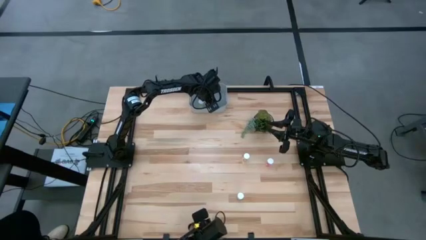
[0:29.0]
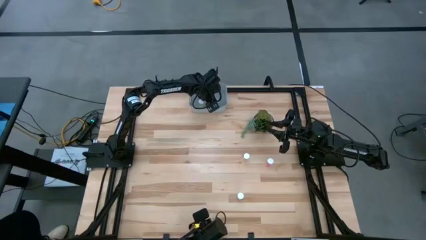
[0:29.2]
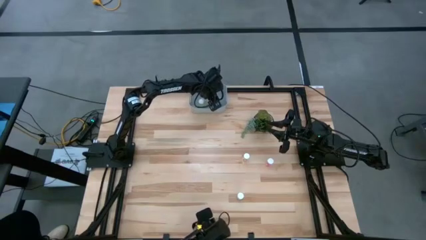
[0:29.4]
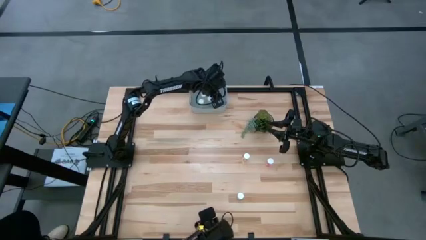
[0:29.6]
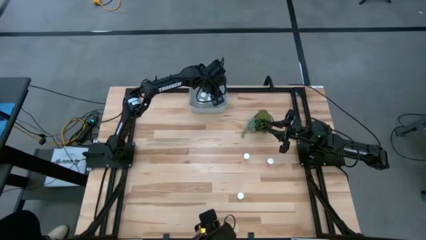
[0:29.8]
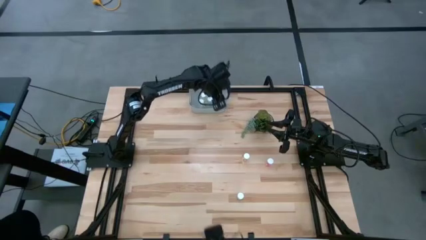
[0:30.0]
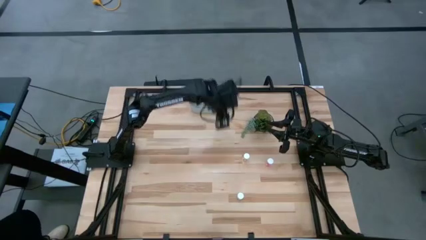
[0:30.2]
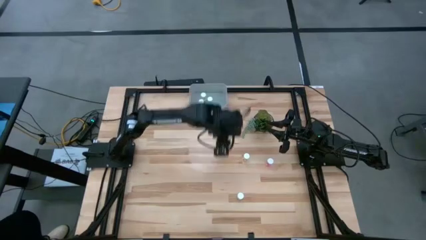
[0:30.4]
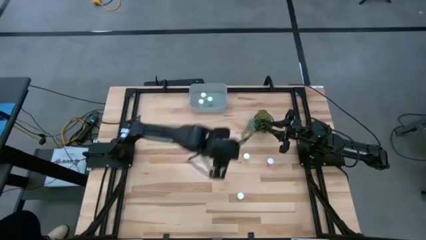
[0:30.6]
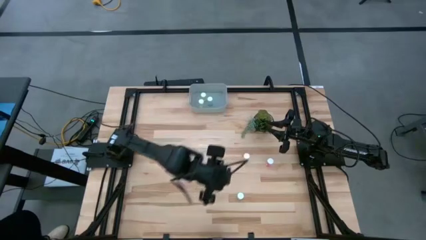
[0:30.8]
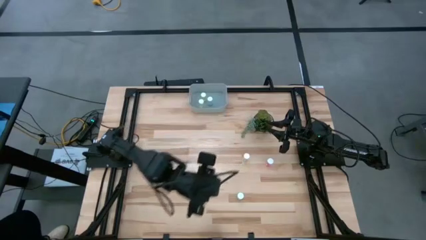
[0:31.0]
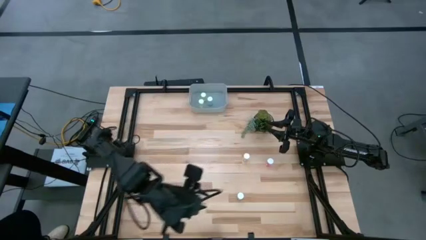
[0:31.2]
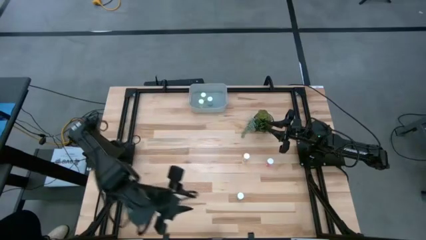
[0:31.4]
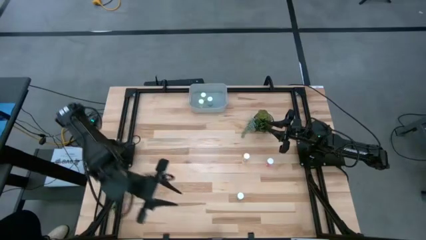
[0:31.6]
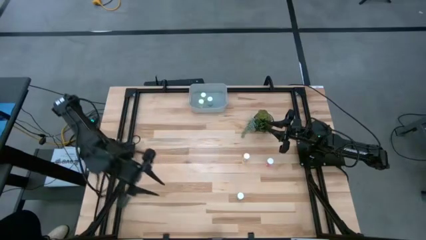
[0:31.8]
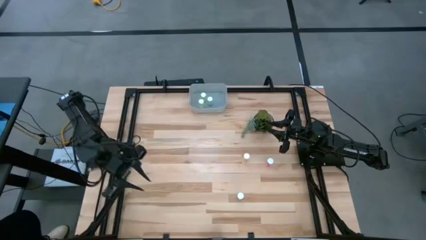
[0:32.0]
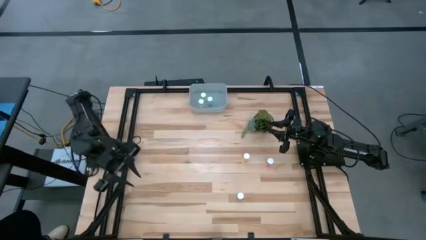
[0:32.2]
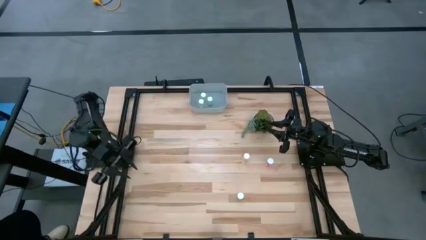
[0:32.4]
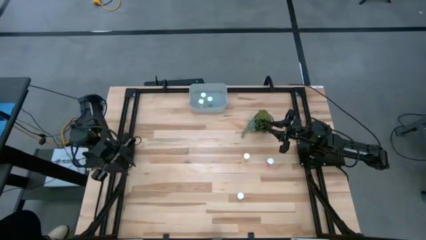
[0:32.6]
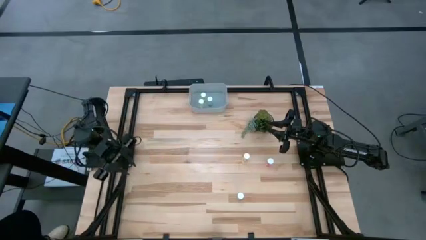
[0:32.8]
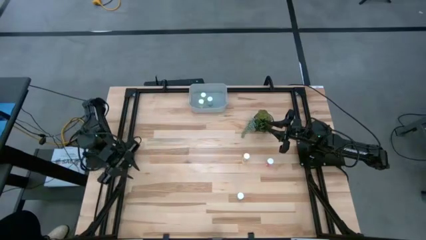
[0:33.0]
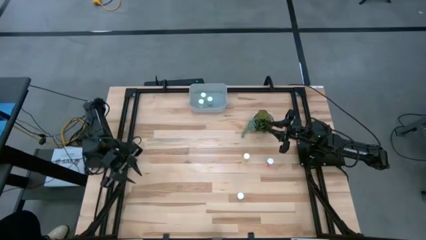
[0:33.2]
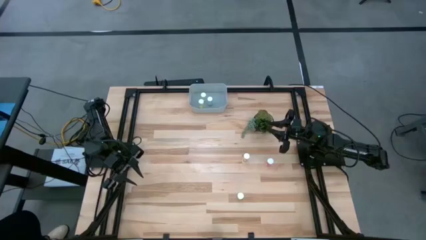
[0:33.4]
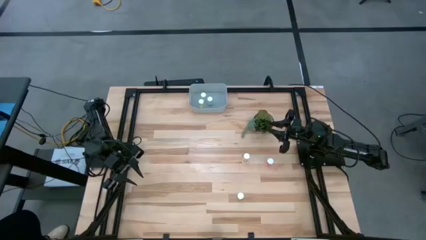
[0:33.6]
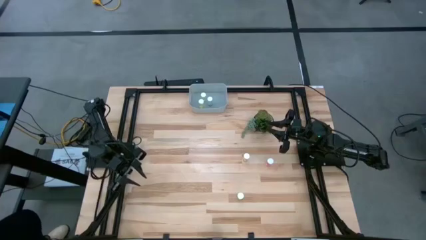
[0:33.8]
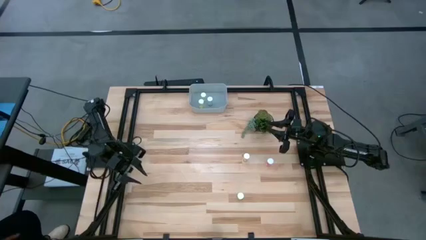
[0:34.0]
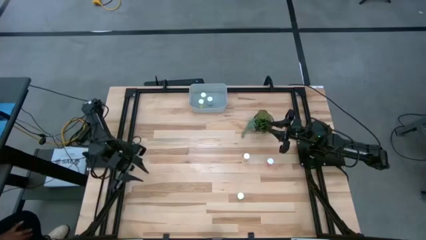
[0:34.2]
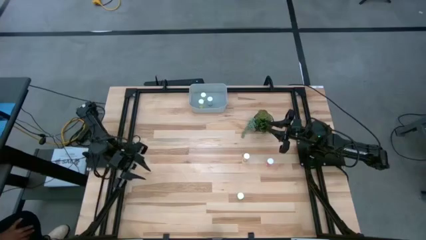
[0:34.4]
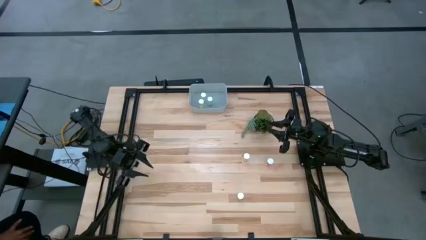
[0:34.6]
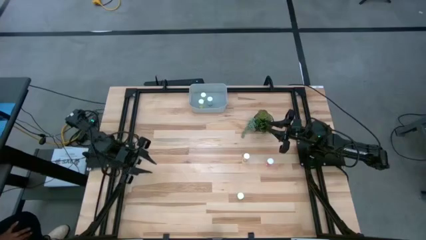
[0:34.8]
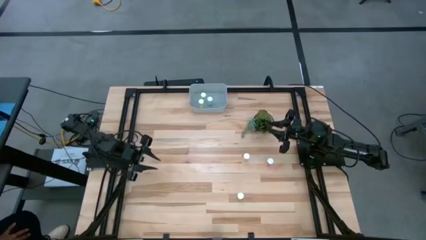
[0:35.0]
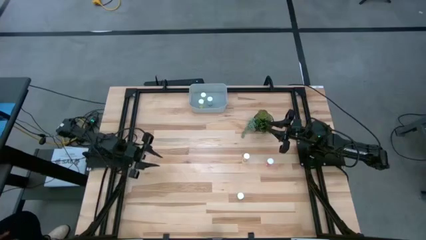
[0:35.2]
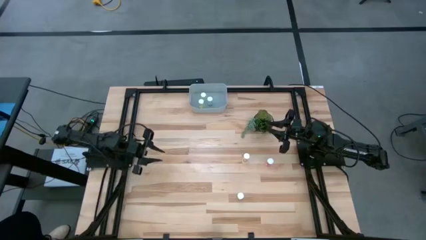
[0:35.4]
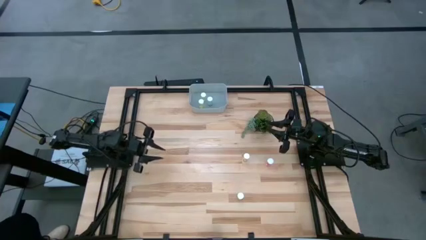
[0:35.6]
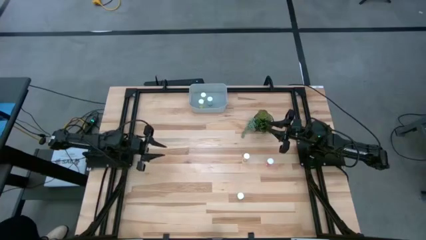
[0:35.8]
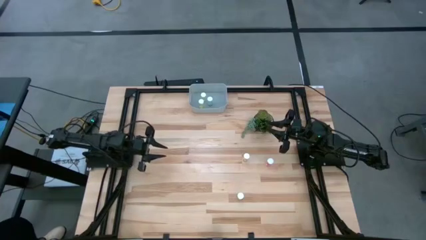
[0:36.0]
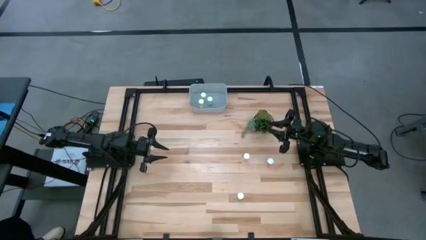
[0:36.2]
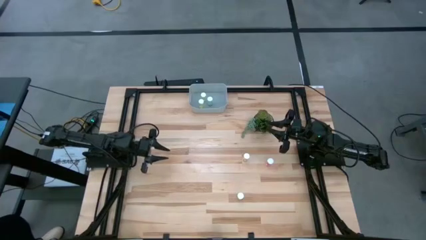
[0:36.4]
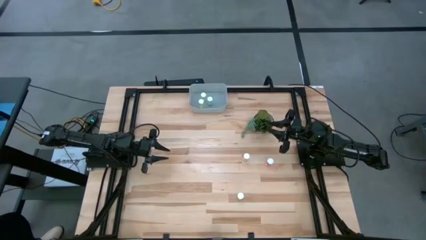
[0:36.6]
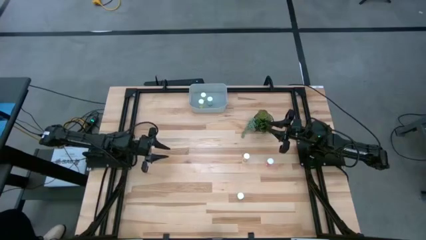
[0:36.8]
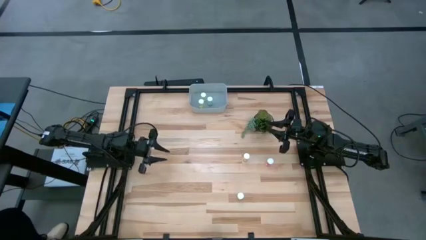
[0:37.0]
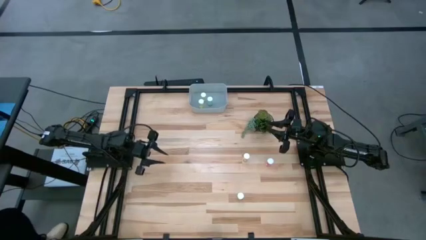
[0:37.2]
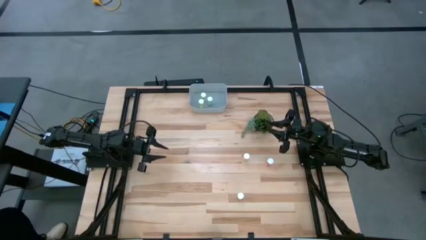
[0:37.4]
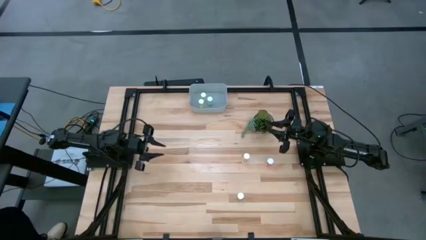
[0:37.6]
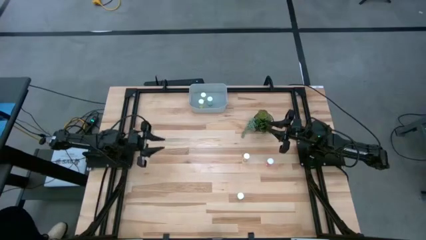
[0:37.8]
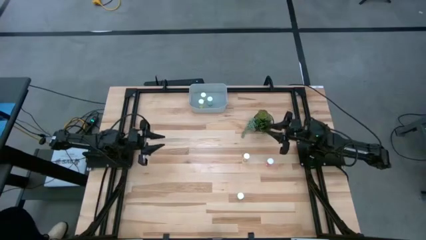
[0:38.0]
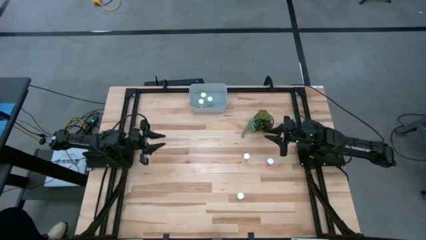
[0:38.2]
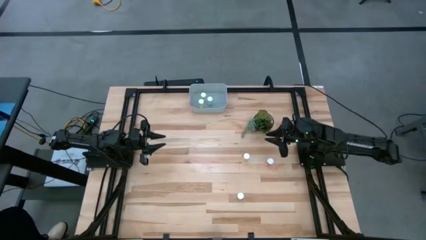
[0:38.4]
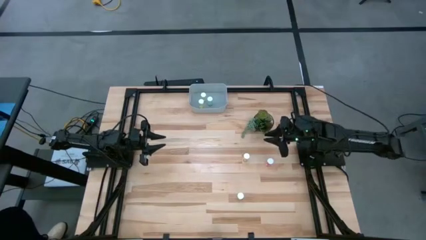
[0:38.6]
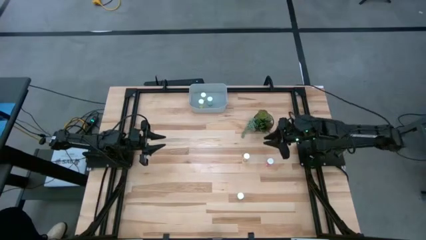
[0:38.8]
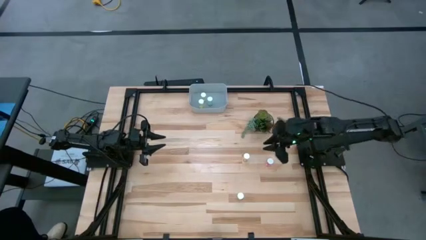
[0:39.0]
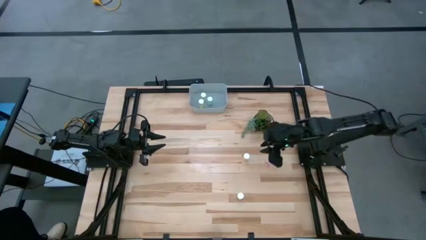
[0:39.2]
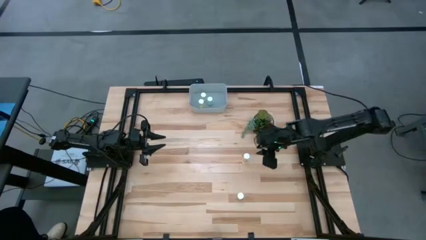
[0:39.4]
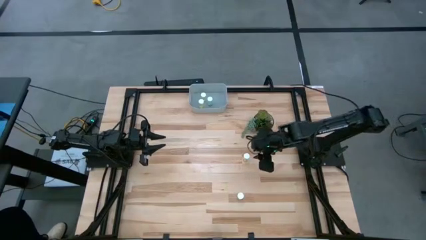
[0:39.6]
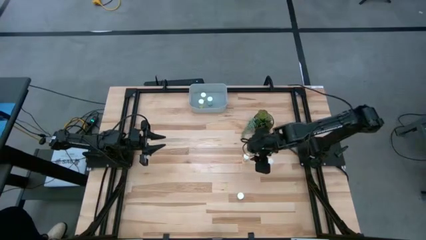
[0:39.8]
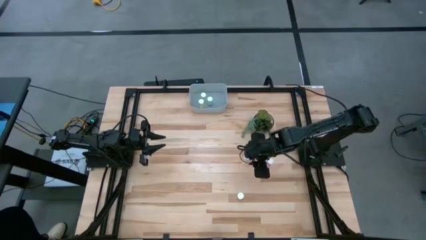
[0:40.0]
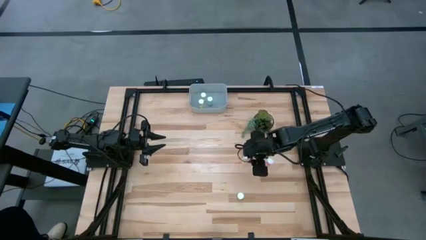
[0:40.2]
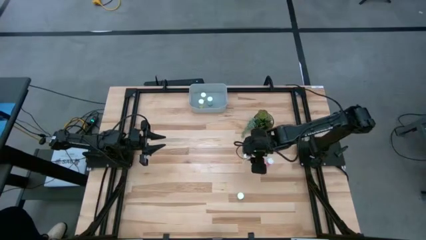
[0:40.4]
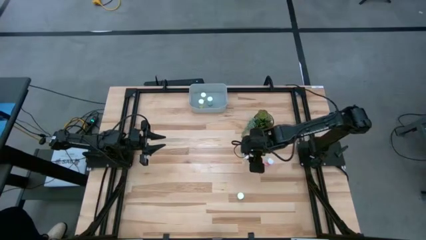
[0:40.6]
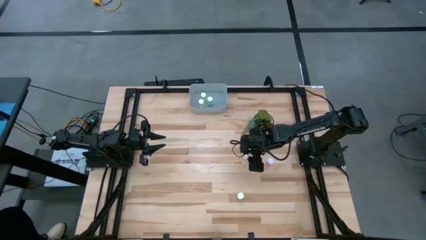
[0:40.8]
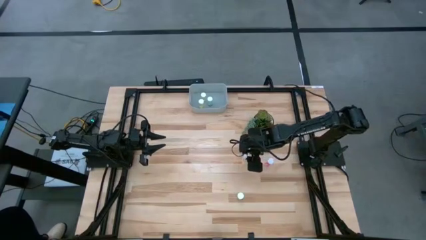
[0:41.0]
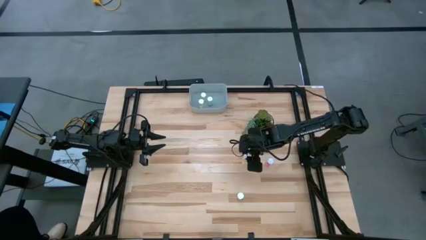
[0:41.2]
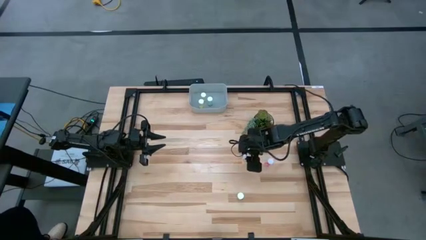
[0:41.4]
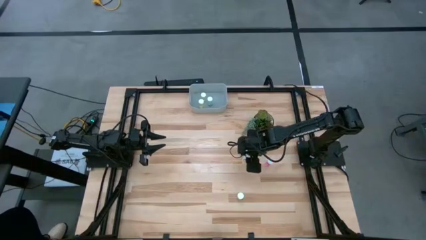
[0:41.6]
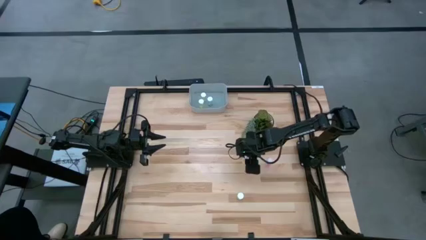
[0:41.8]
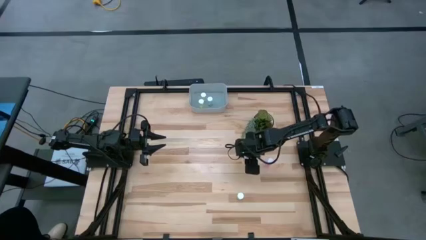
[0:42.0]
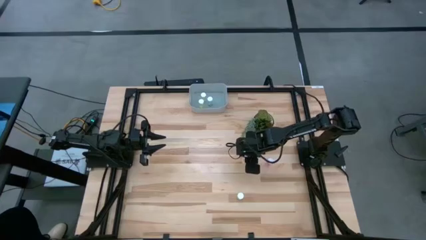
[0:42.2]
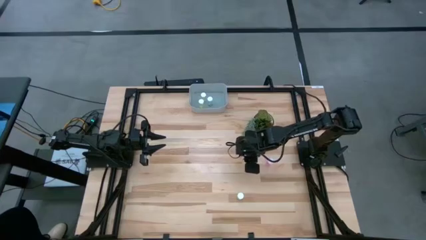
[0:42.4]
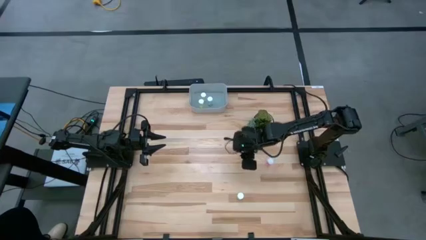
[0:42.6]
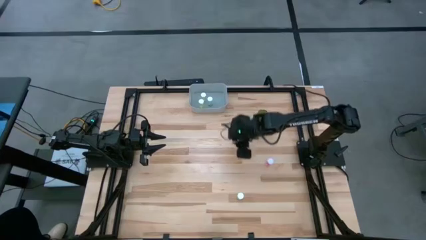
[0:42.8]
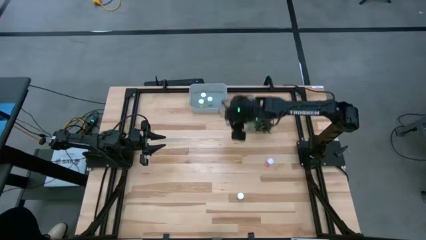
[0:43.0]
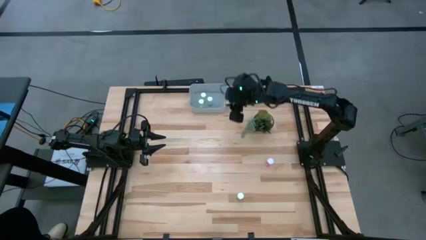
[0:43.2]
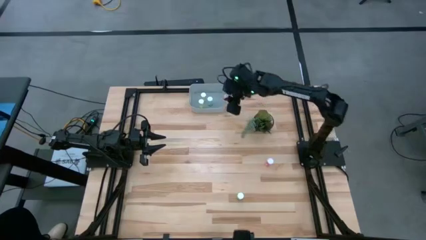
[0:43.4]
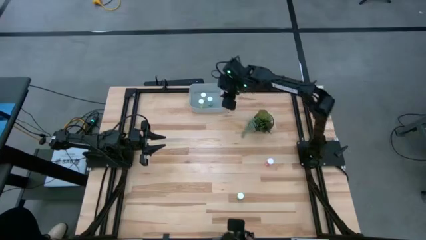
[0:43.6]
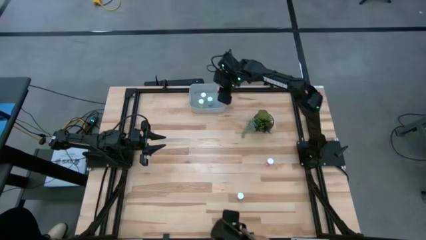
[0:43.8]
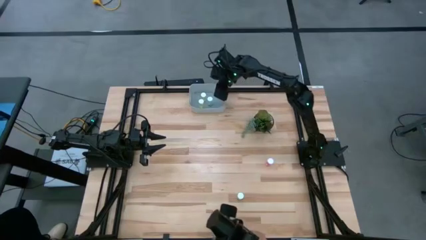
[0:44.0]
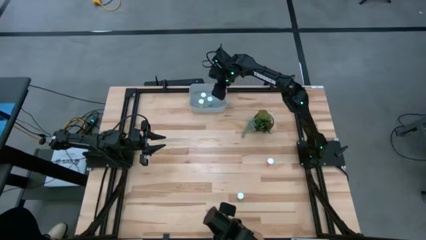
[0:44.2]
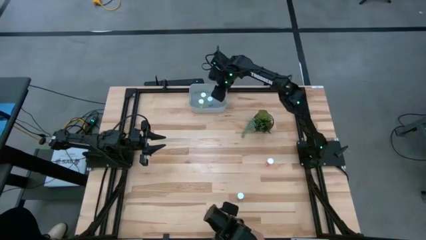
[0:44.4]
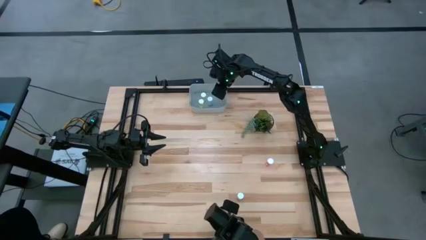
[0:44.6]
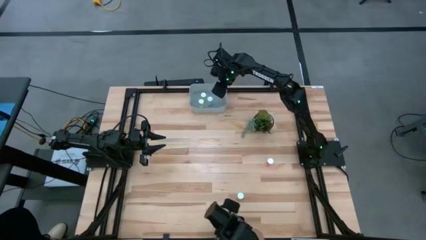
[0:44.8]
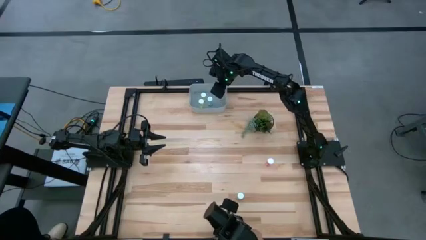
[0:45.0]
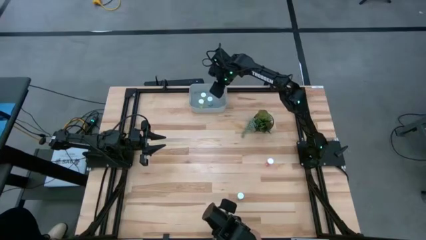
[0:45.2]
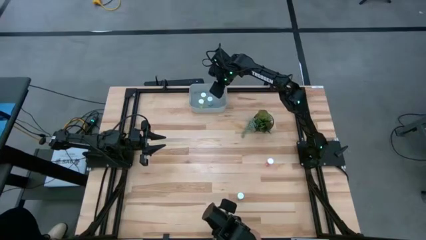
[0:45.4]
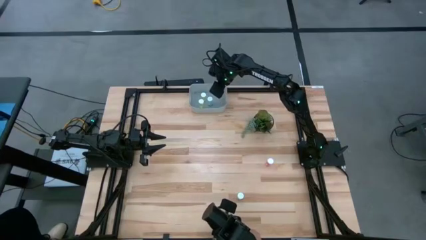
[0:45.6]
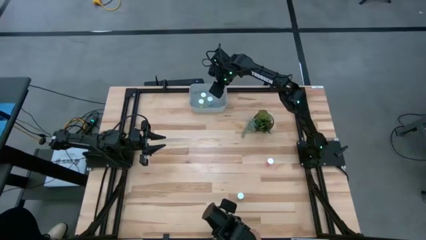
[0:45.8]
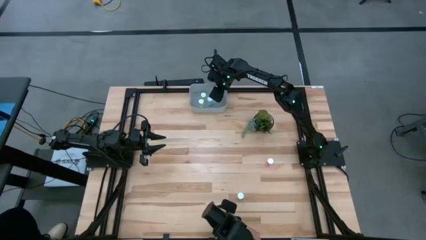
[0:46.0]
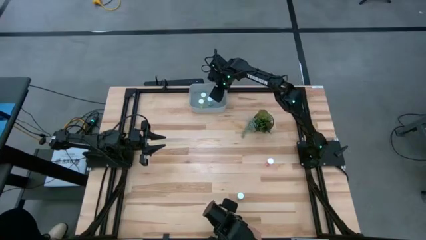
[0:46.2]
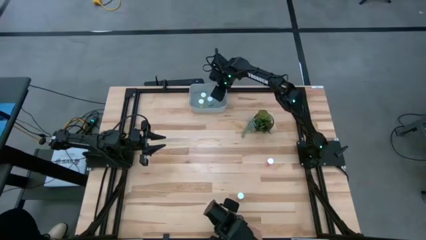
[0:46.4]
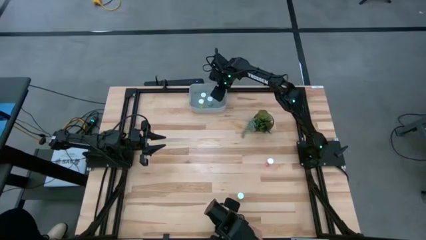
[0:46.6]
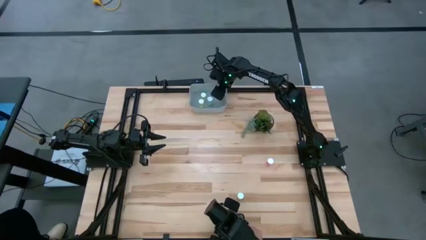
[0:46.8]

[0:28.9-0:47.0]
Task: Pick and place pill bottles into a basket
Put the yellow medicine bottle in the gray bin
